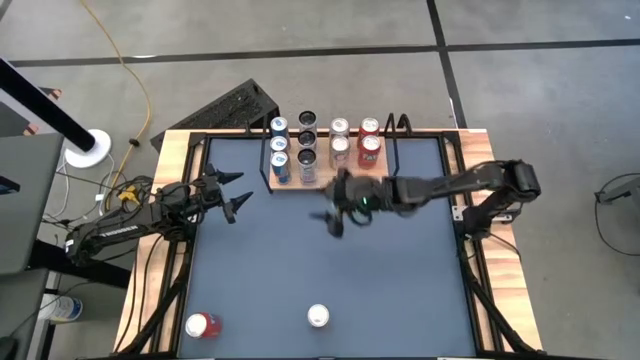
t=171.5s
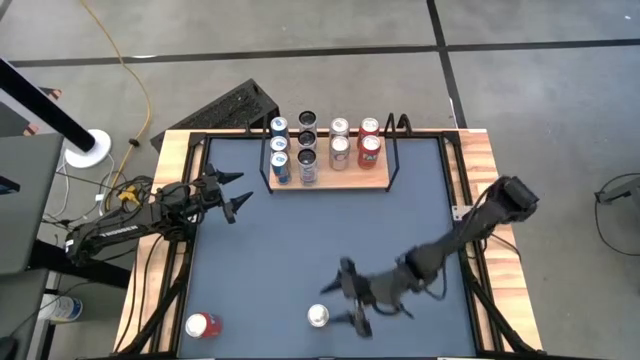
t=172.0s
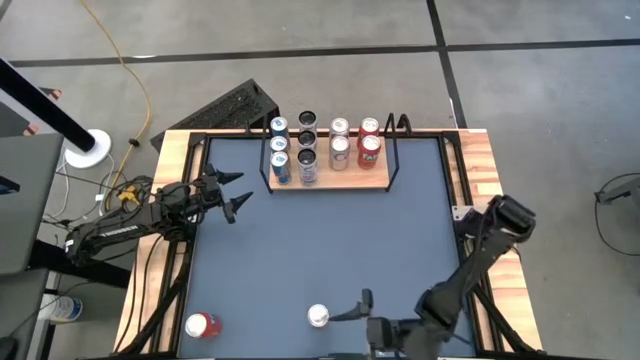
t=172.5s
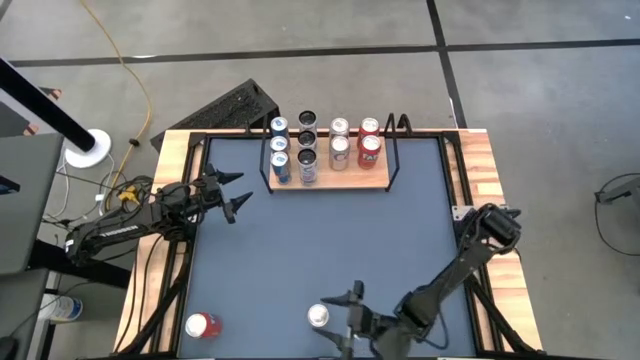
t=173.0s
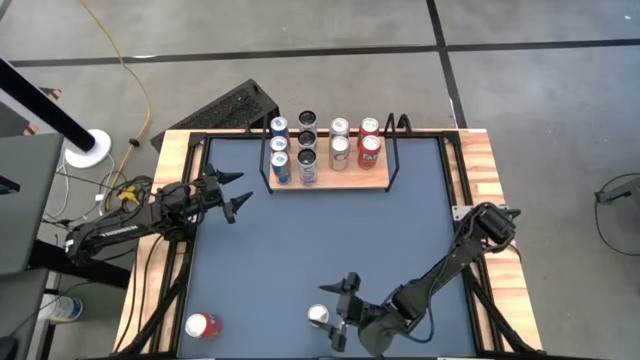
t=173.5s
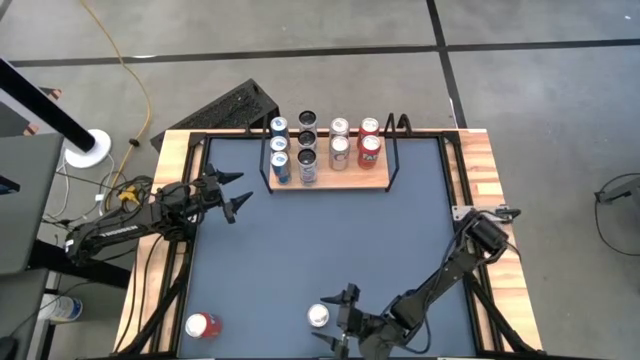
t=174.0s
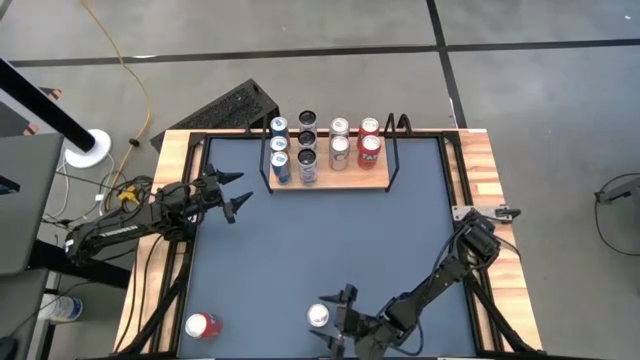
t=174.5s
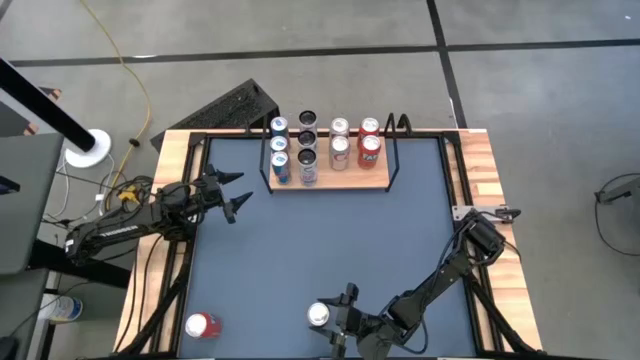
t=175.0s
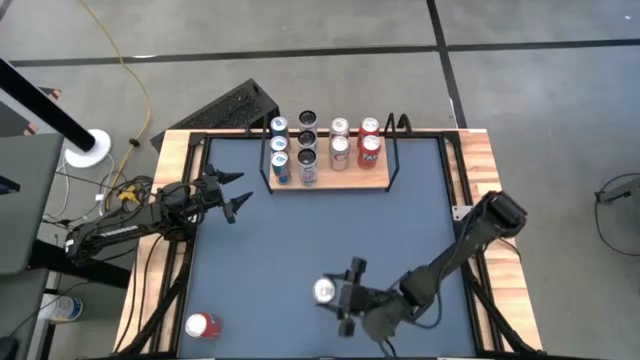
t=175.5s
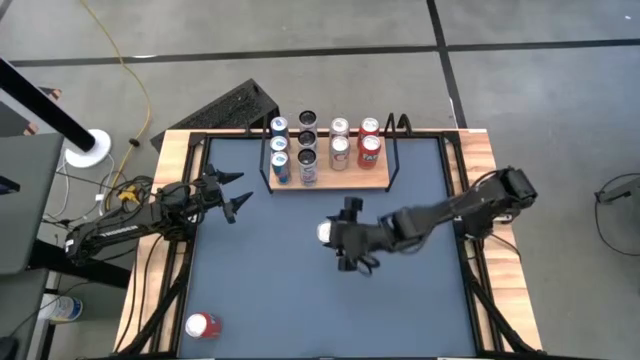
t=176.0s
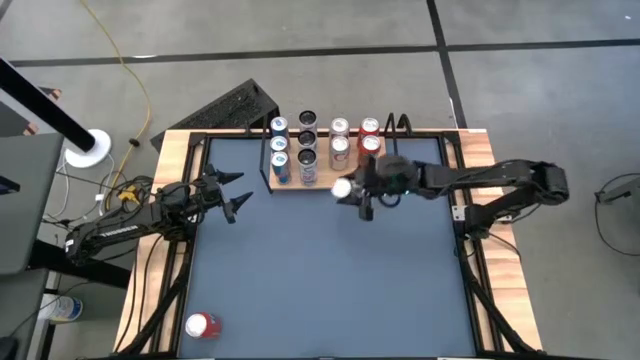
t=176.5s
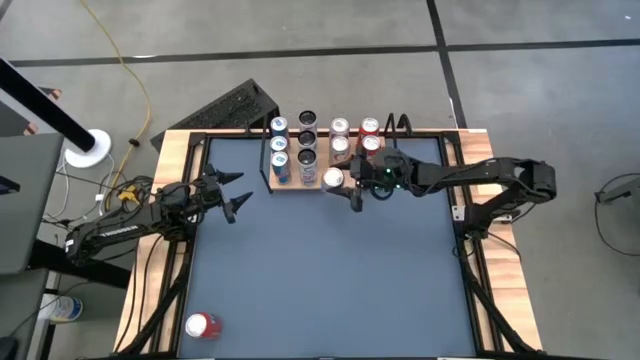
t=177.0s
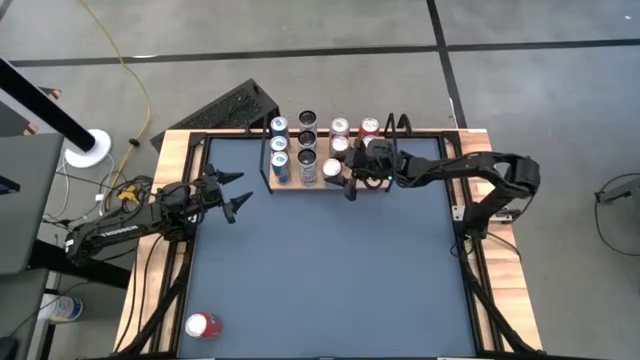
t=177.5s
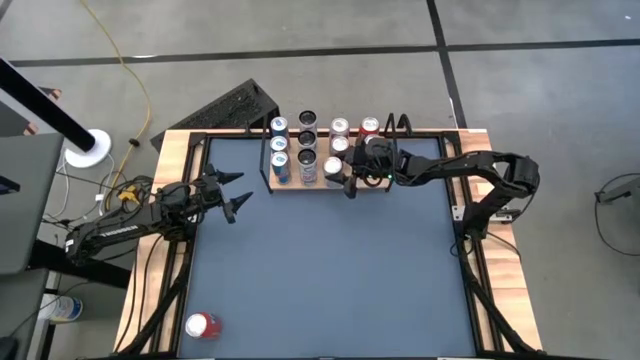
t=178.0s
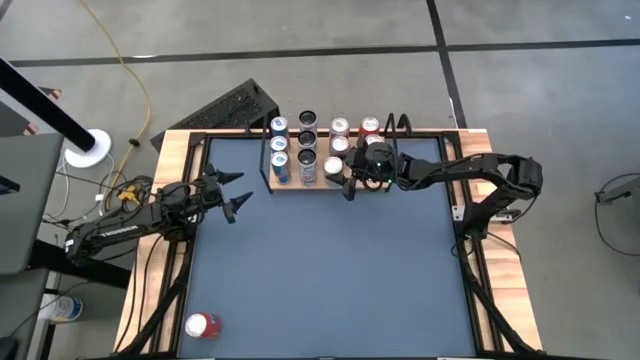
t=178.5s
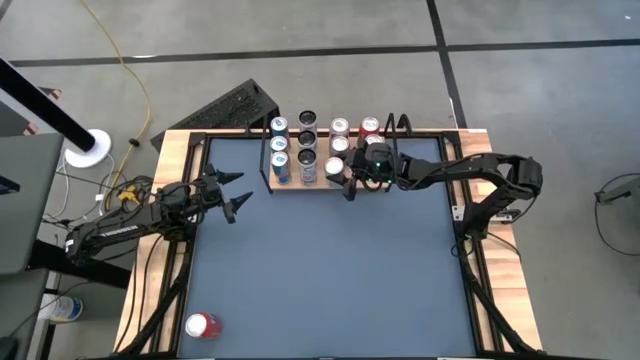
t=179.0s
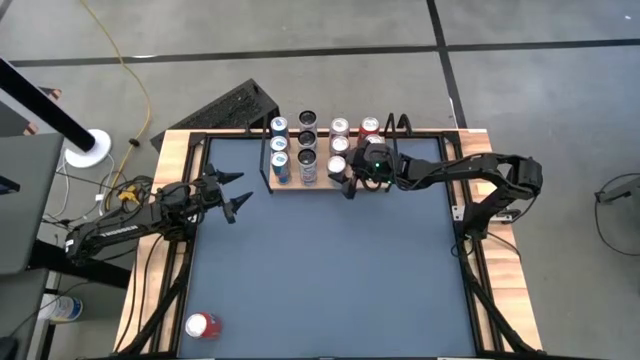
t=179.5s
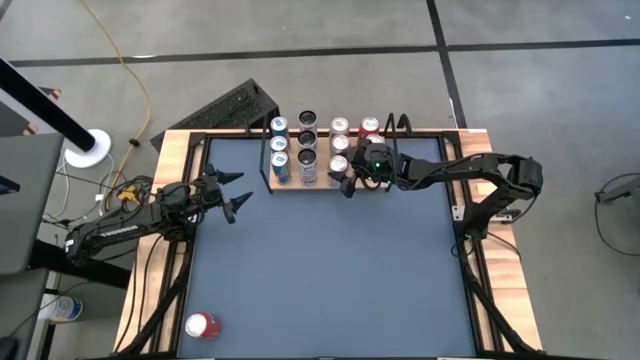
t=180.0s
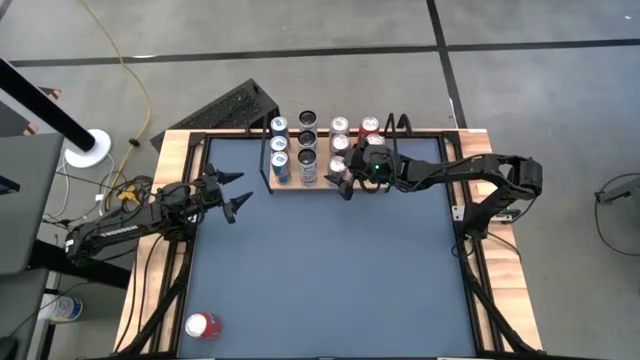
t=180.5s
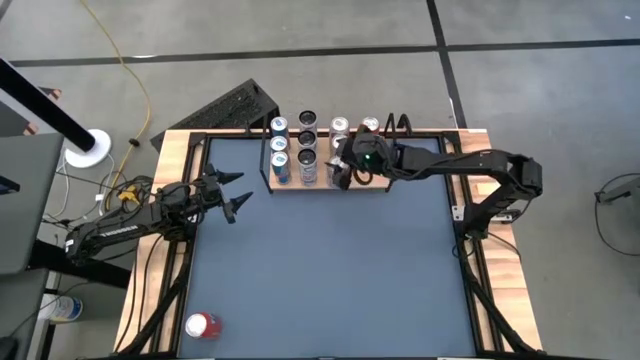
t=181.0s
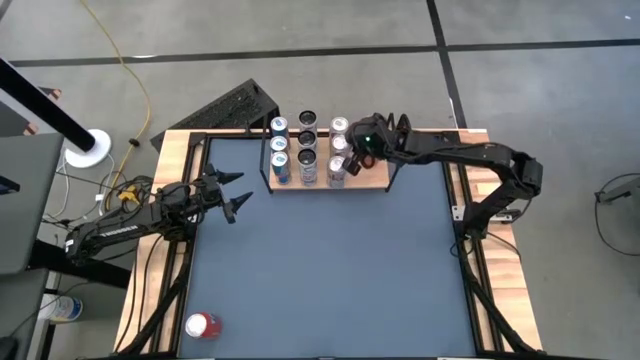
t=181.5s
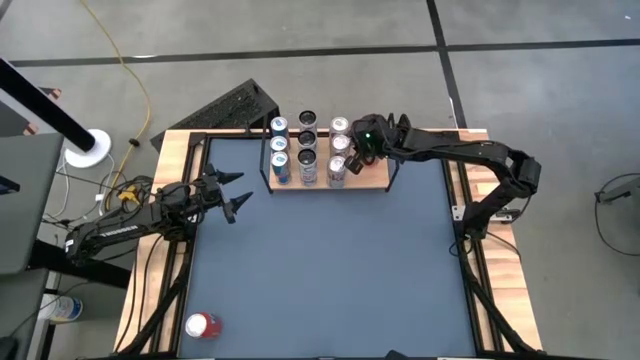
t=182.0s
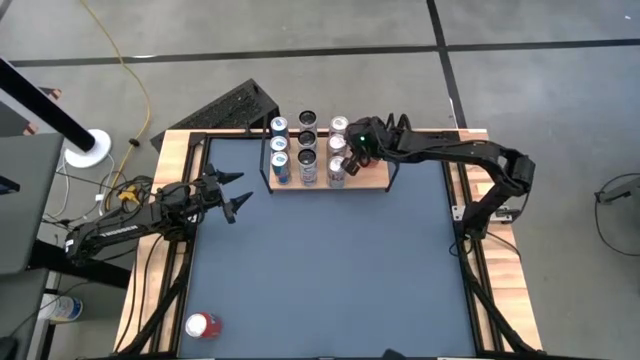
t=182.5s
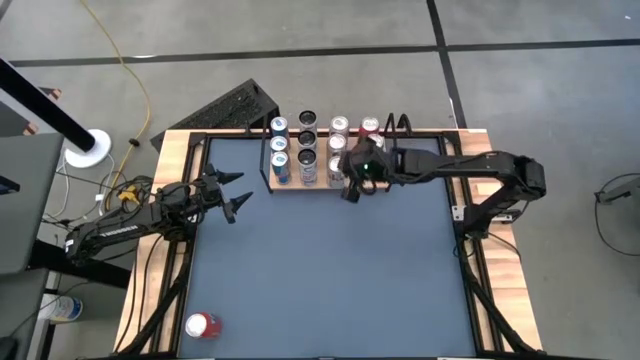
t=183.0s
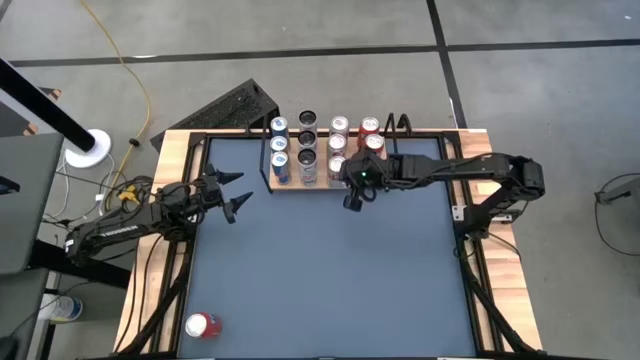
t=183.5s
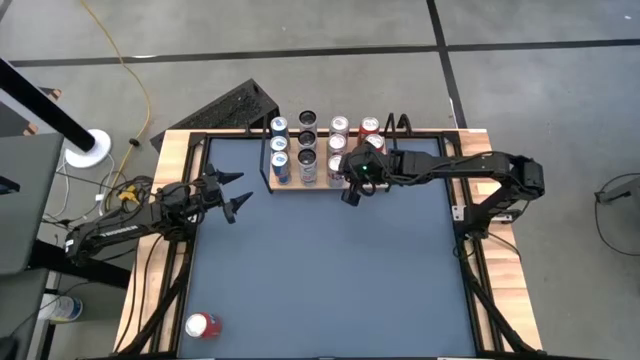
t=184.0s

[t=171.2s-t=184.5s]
Task: Place canned beverage on shelf
Put the silver soda can onto the shelf aligned with the other silver soda cans

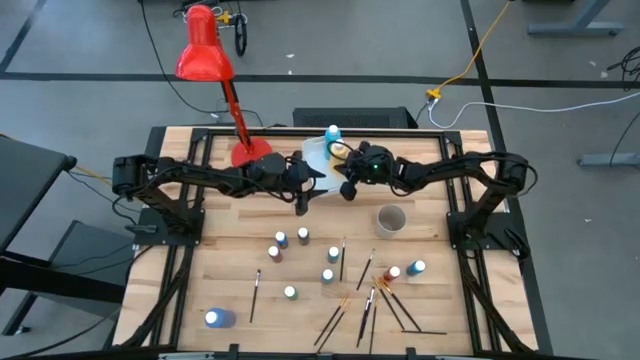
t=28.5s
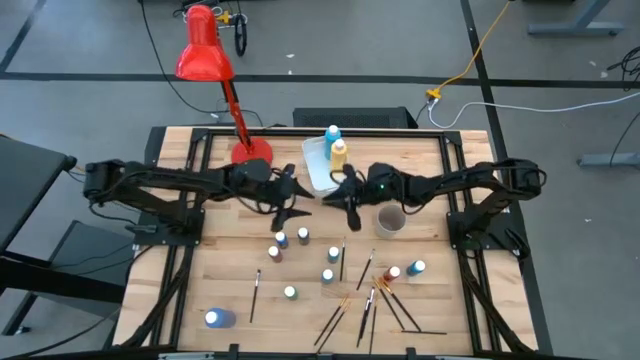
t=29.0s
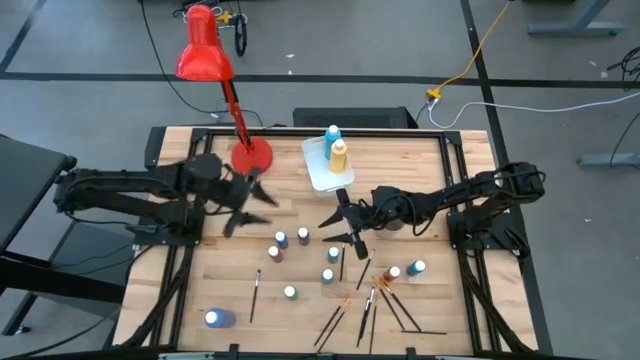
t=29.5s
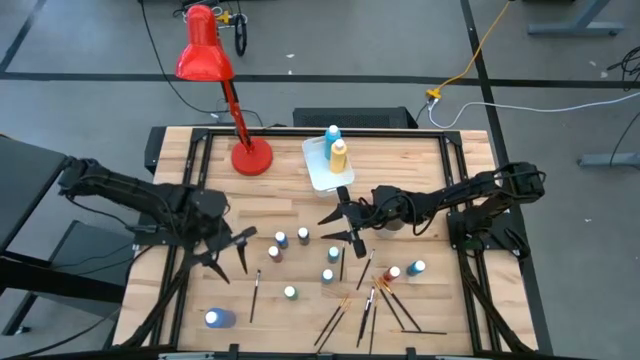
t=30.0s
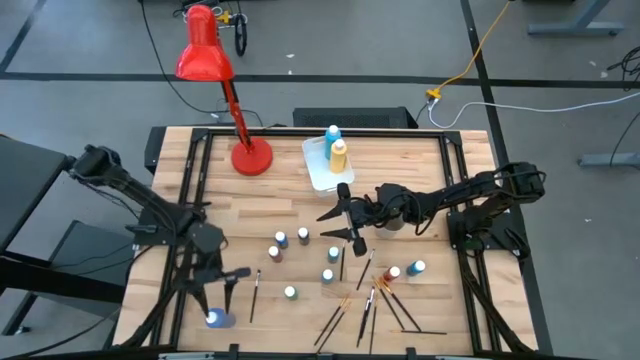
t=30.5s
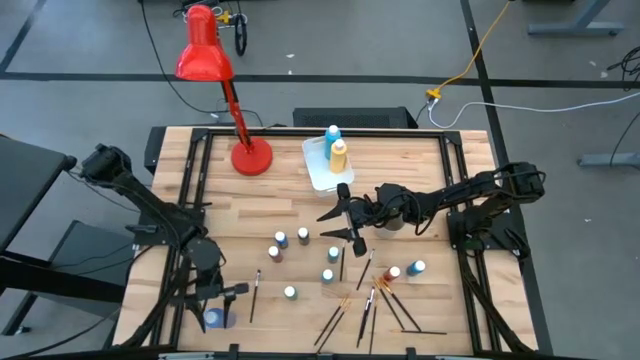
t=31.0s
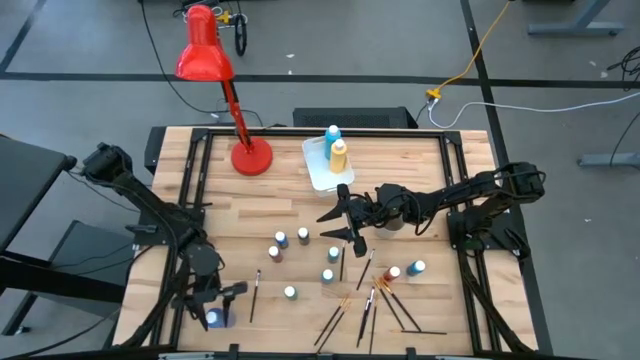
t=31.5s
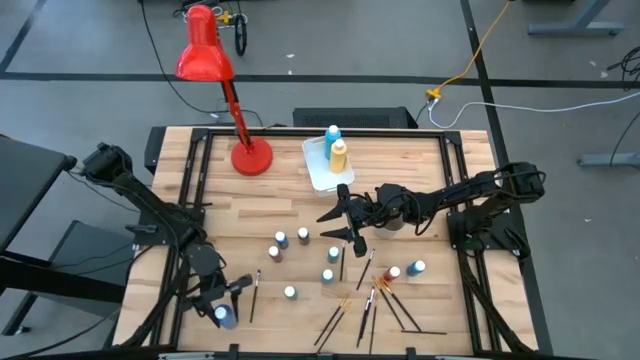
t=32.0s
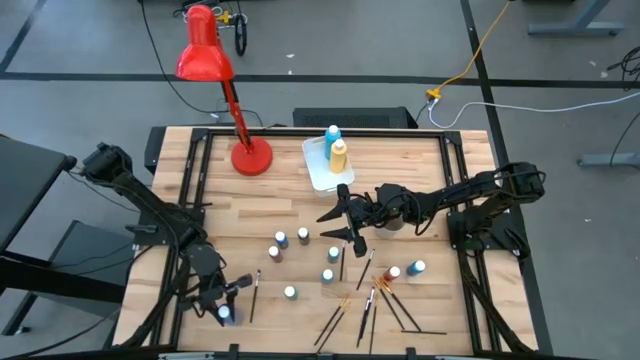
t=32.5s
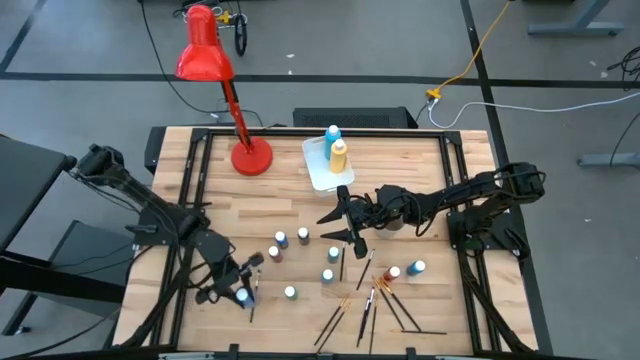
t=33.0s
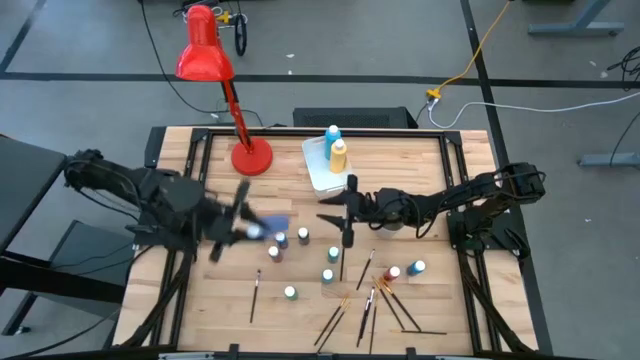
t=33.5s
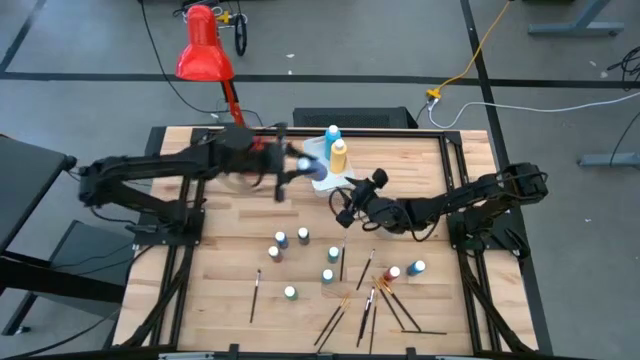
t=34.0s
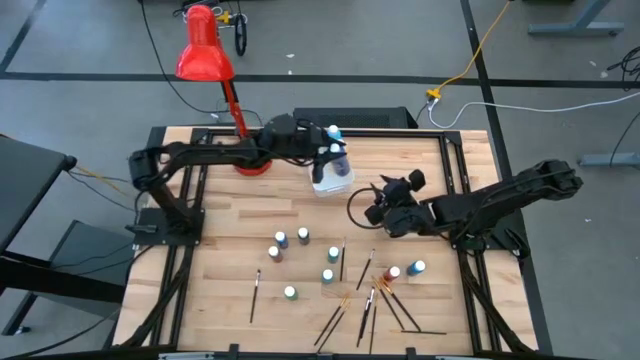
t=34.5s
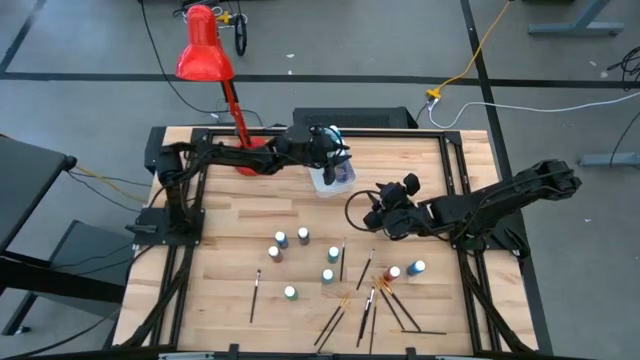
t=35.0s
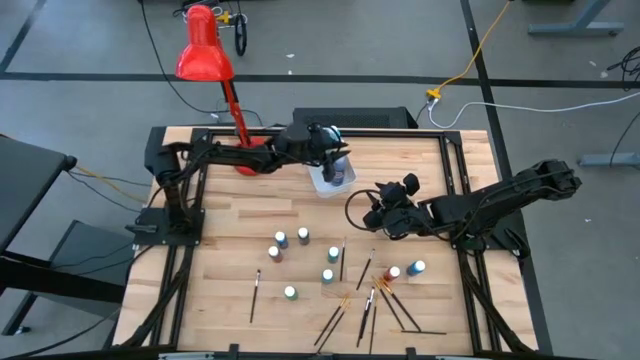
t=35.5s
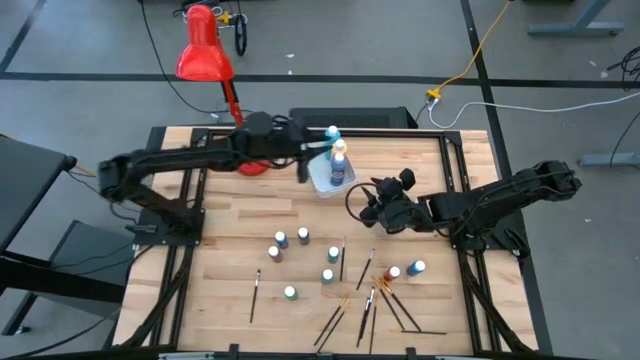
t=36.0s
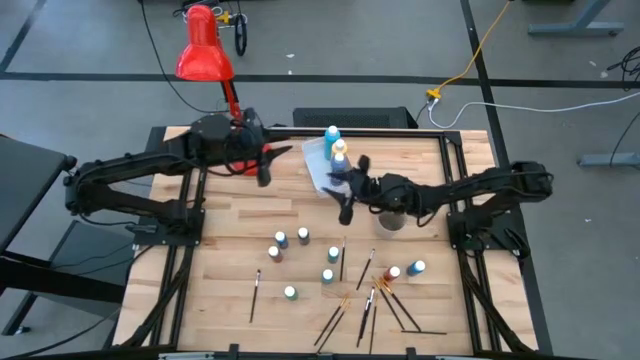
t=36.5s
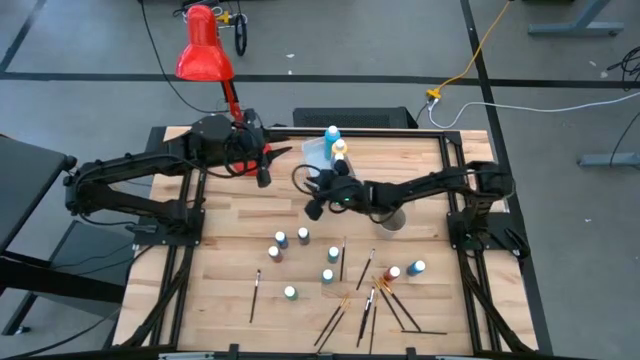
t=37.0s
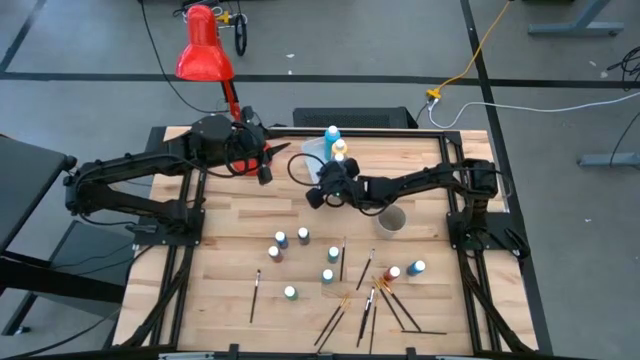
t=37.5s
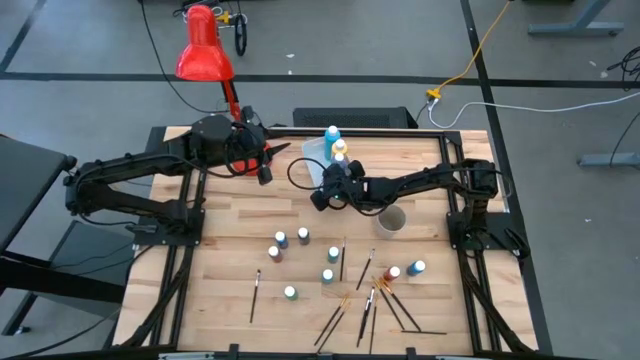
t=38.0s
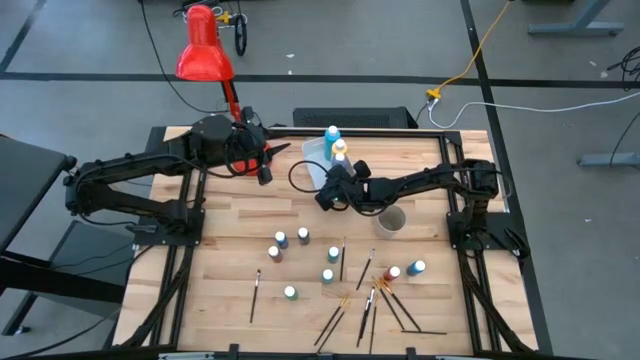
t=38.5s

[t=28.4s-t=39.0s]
Task: Pick & Place Paint Supplies
Put the large blue paint bottle into the white bin
